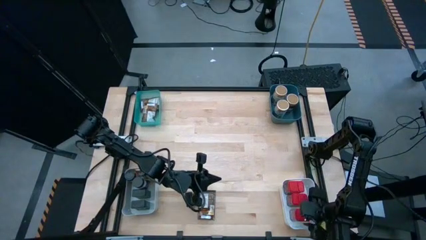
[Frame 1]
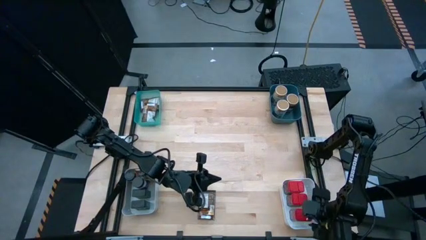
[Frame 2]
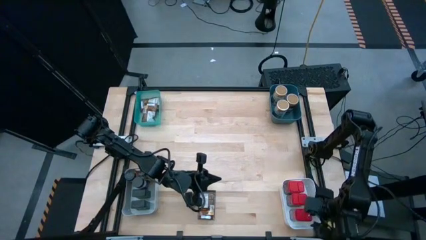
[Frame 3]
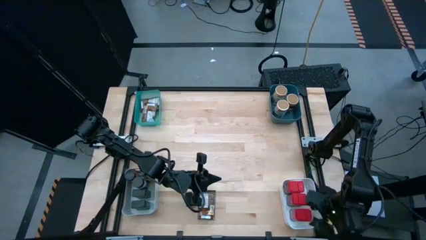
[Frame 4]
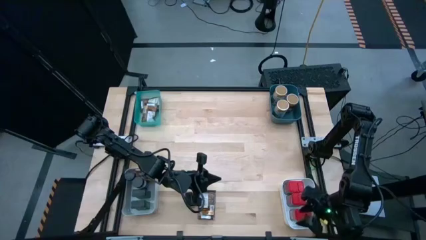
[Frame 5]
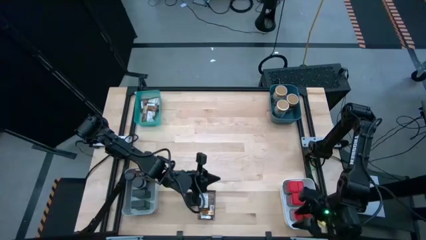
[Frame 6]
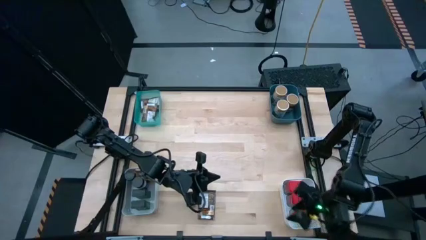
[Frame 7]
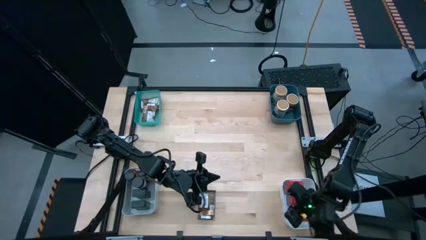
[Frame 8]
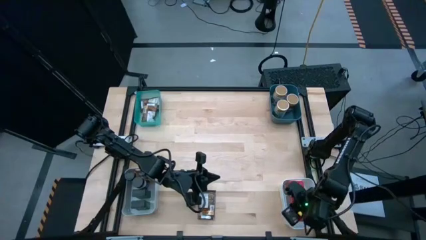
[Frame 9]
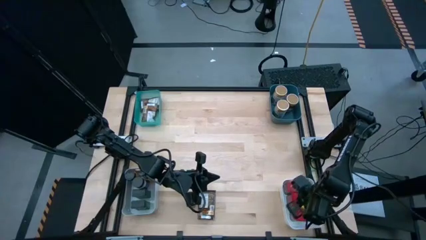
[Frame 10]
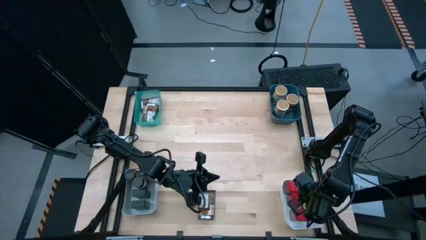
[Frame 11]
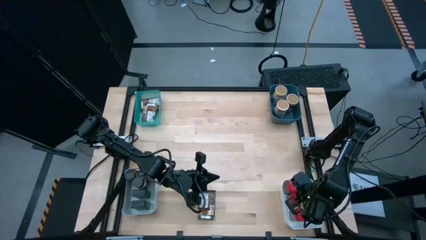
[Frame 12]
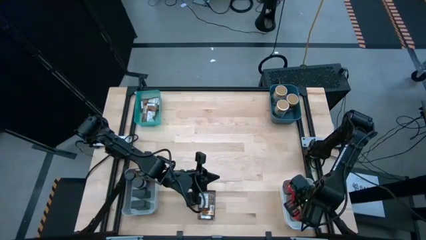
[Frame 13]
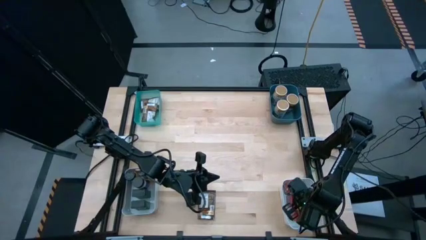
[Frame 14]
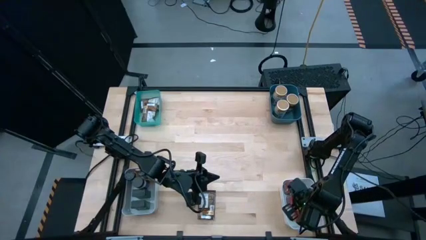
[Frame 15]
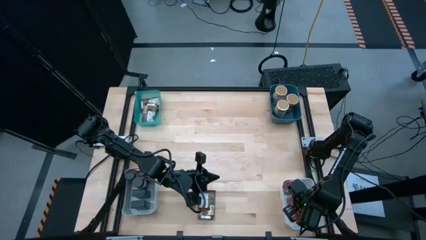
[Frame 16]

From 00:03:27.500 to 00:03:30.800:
Task: Sort spices by type
Adjust the middle red seasoning can in the white bin

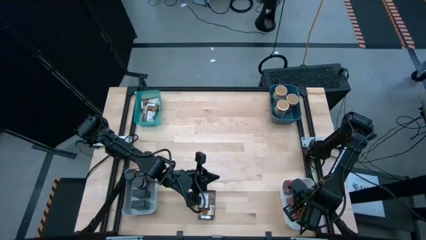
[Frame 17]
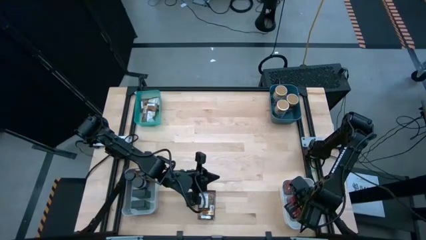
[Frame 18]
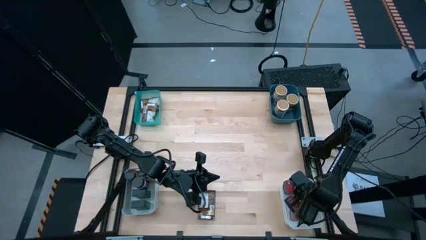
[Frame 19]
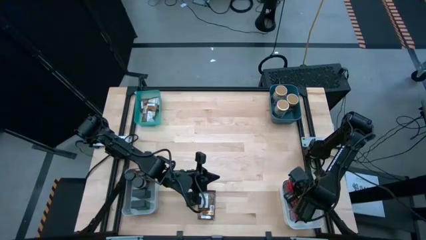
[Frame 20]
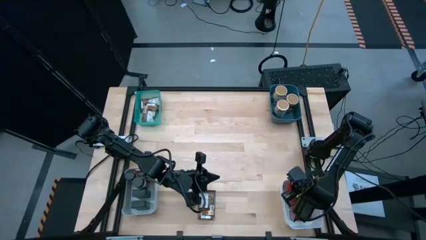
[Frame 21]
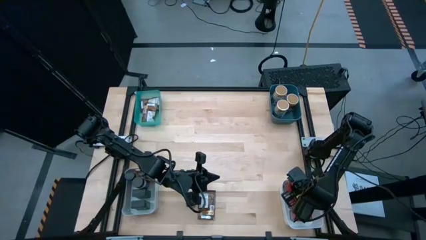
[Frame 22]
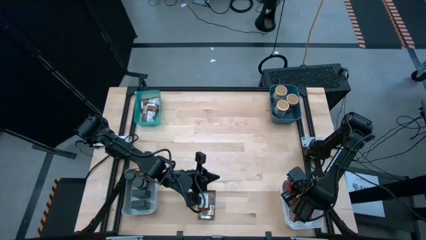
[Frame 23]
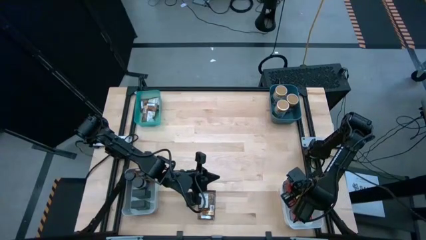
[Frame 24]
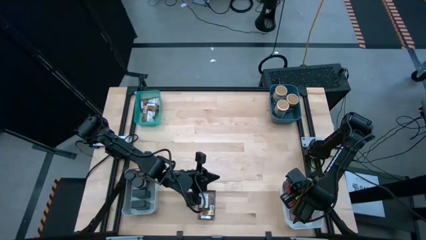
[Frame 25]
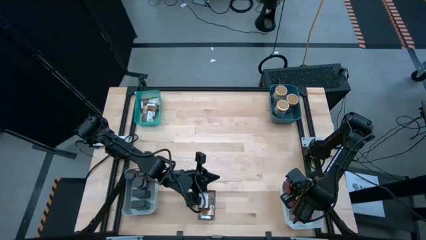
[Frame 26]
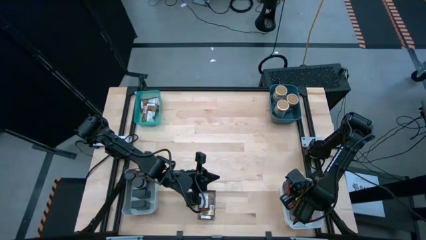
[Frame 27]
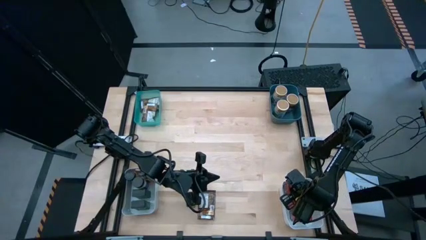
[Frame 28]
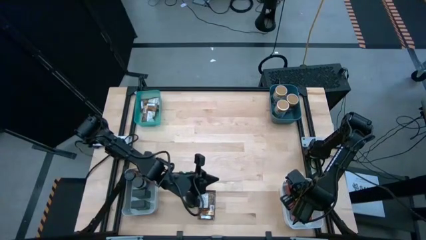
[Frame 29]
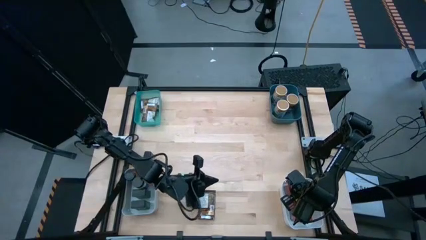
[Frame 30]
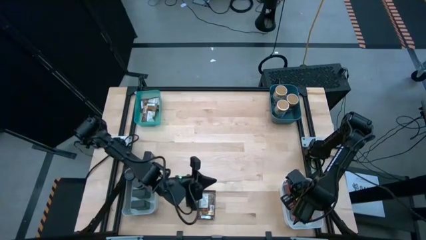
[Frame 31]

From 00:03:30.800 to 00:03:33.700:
Adjust the top red seasoning can in the white bin

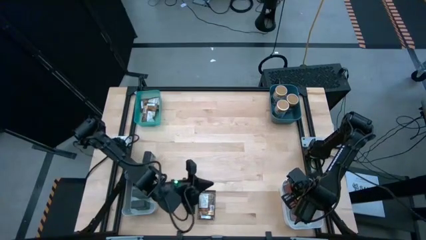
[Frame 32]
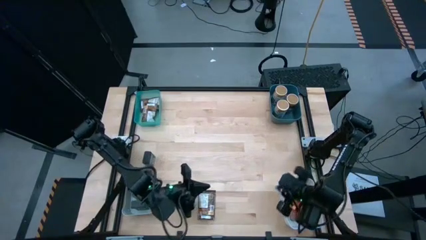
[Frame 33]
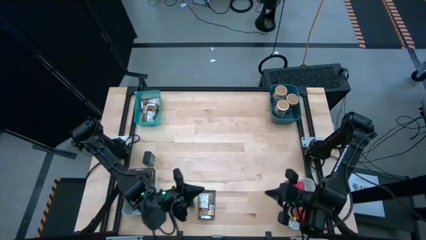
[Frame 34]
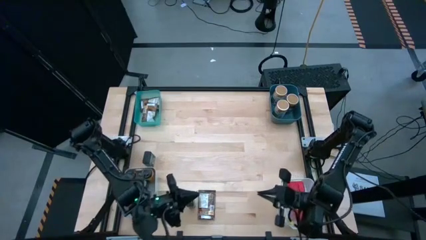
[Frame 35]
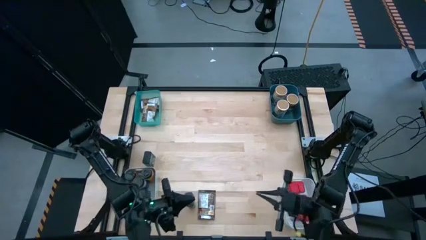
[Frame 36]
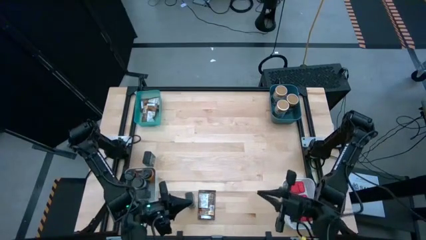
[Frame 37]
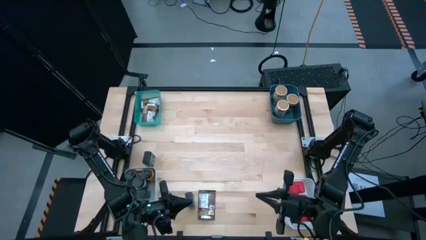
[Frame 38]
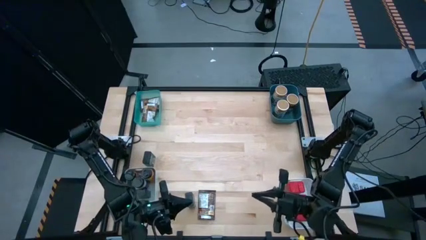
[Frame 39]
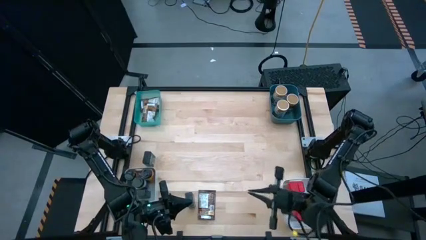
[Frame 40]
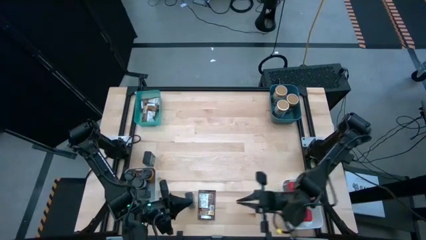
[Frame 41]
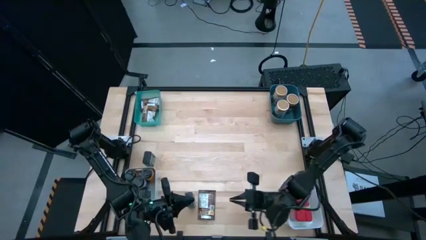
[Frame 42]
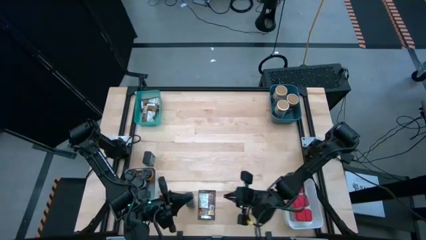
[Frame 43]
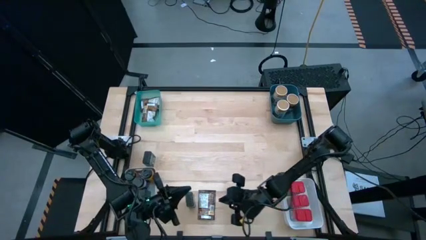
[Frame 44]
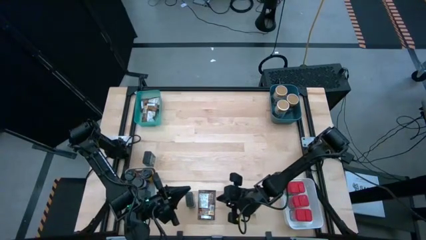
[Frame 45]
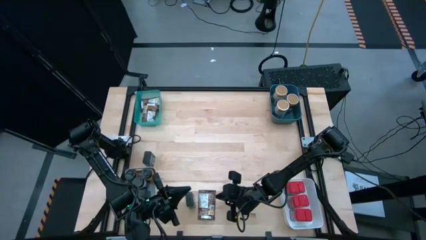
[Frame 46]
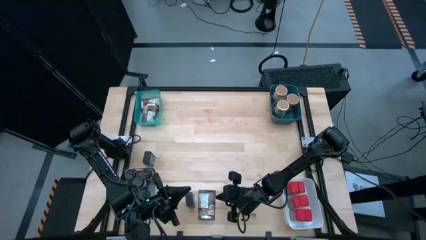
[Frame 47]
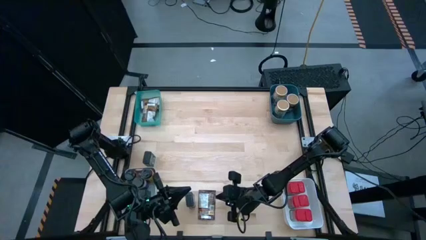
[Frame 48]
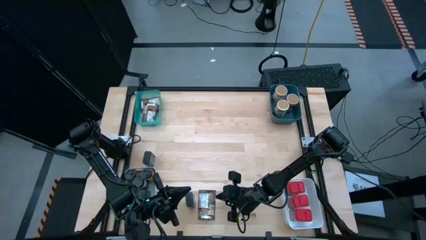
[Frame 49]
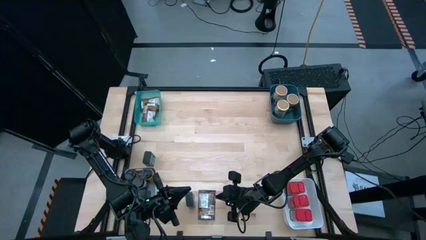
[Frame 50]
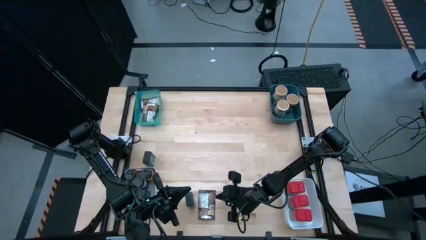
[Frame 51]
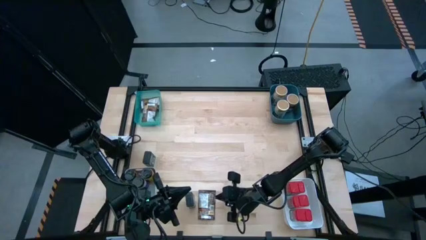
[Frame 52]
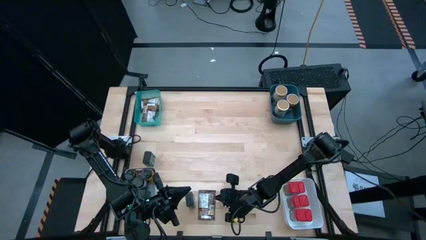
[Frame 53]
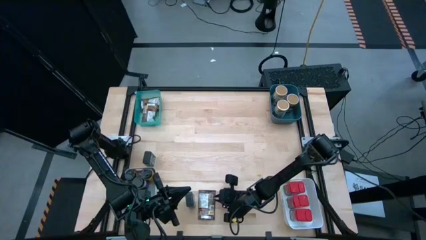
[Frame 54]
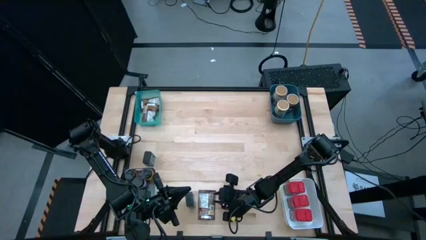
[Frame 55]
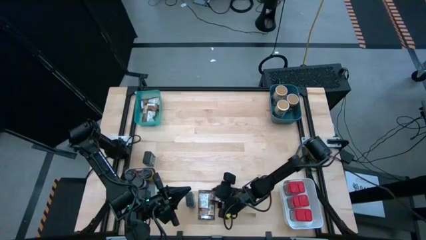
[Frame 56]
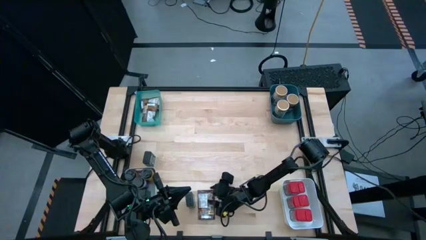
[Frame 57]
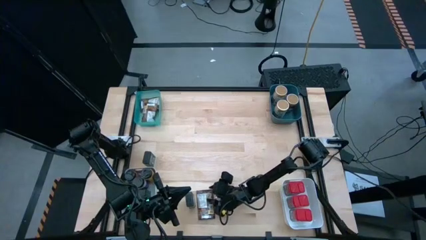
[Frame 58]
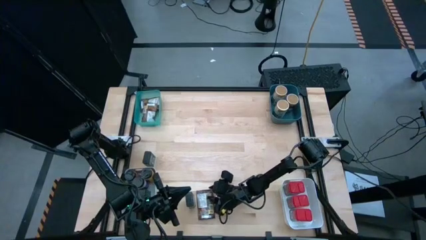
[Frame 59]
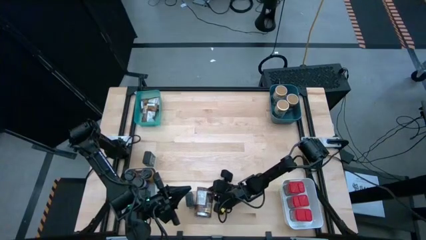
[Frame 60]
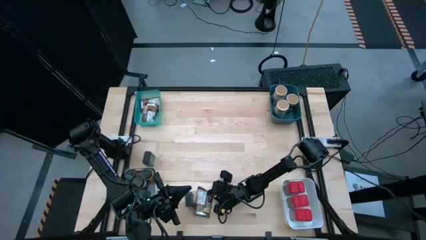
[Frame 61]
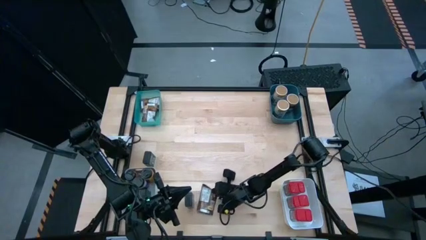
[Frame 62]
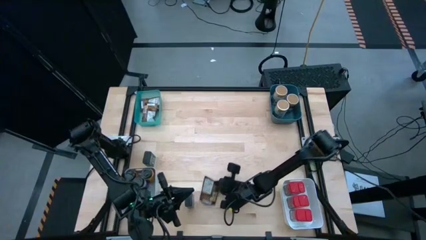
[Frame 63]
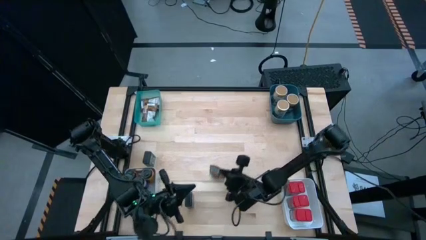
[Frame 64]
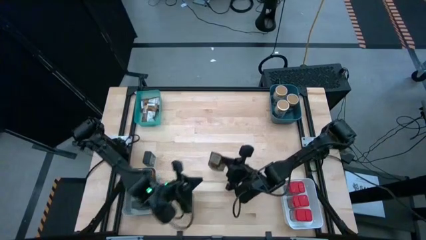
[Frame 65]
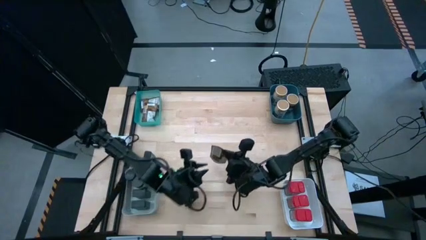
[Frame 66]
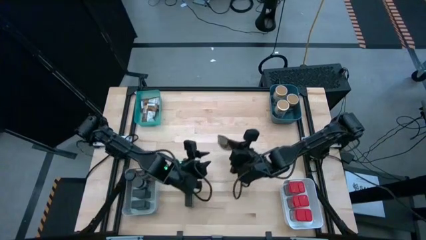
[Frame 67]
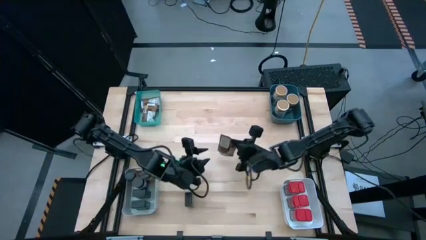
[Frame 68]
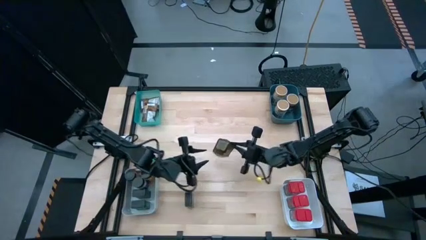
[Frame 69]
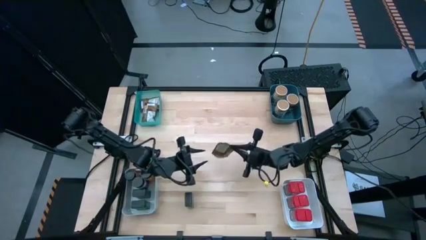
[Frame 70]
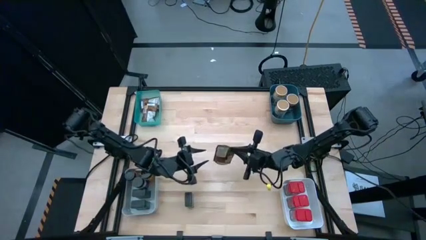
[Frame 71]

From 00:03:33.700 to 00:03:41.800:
Put the brown seasoning pack into the light green bin
